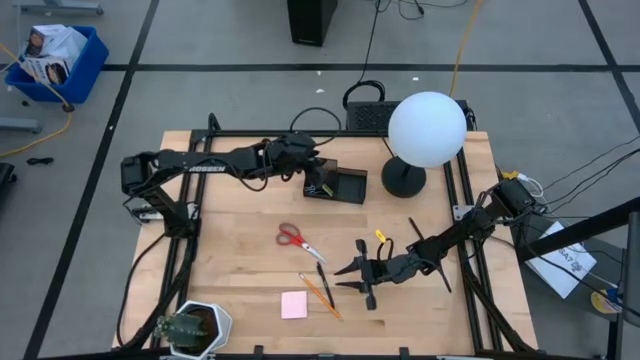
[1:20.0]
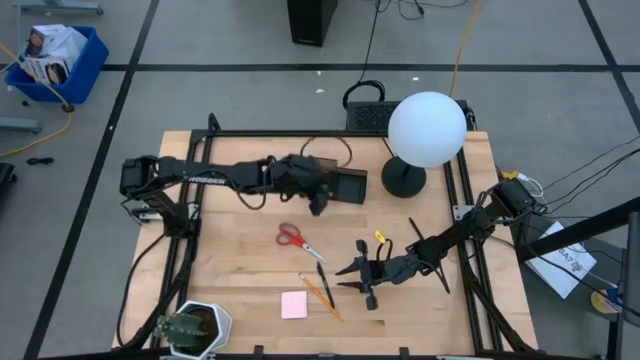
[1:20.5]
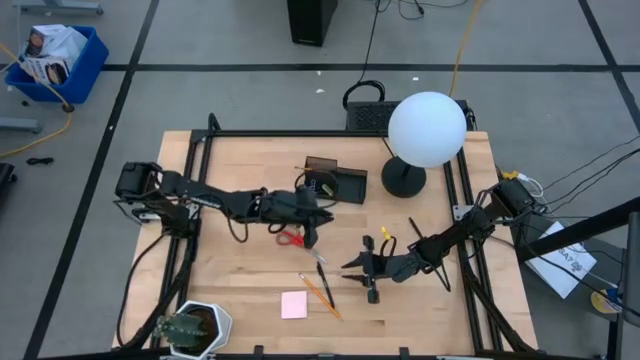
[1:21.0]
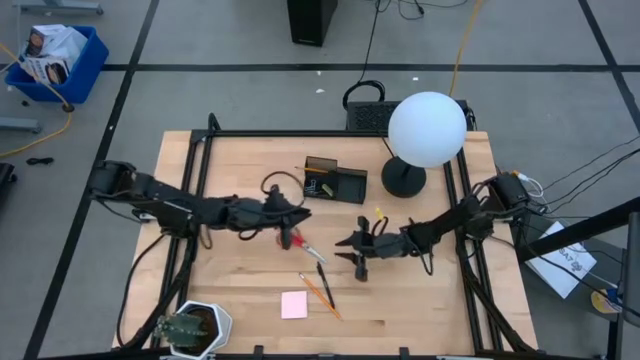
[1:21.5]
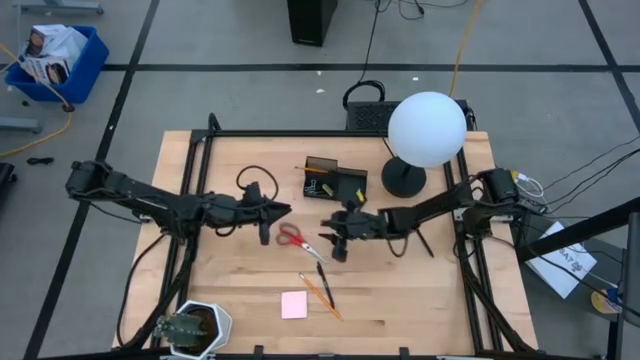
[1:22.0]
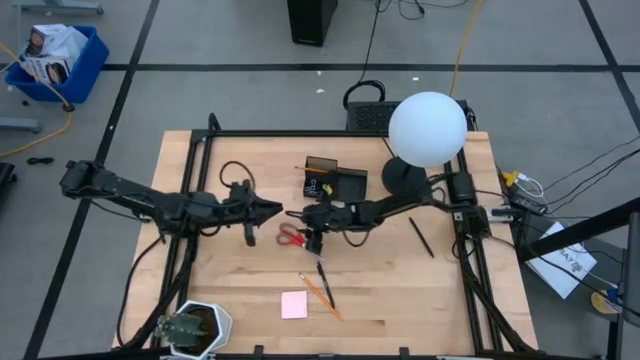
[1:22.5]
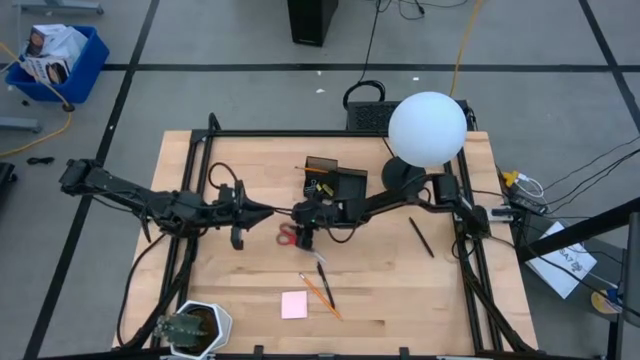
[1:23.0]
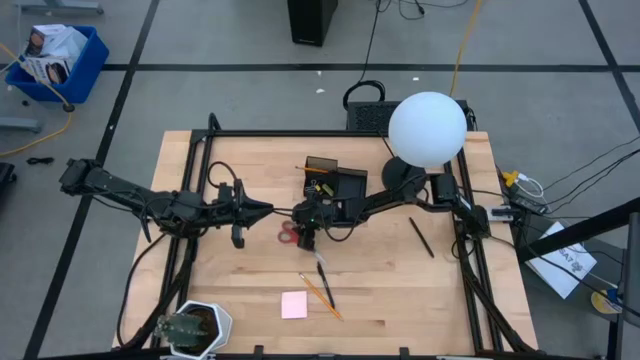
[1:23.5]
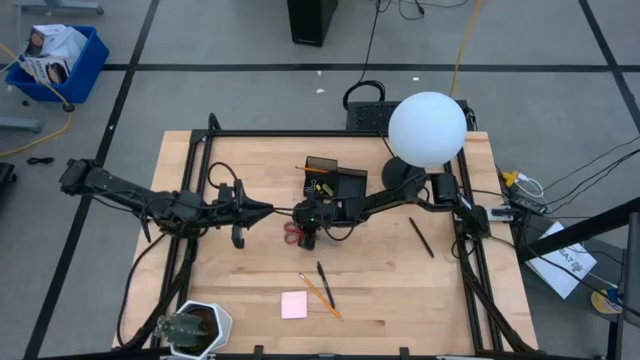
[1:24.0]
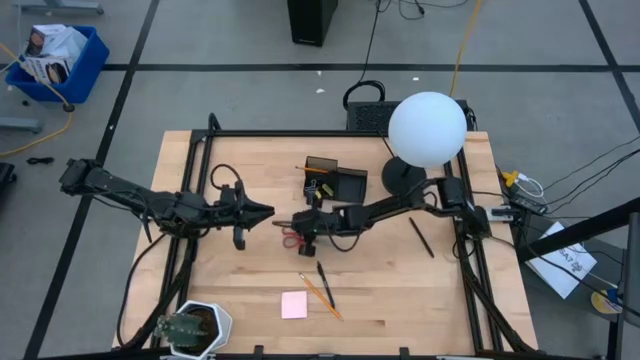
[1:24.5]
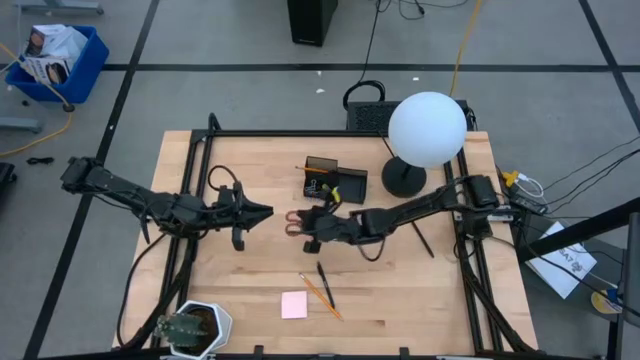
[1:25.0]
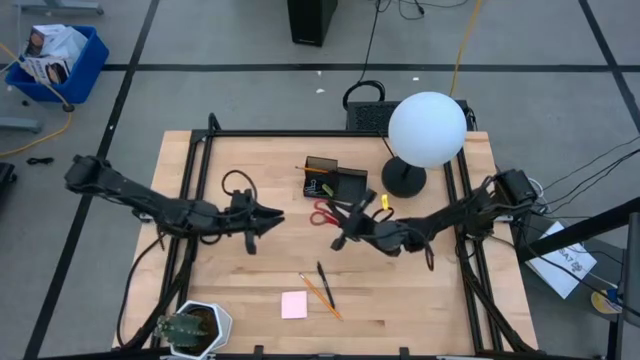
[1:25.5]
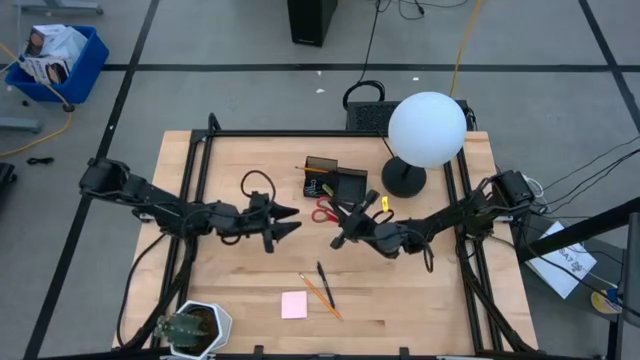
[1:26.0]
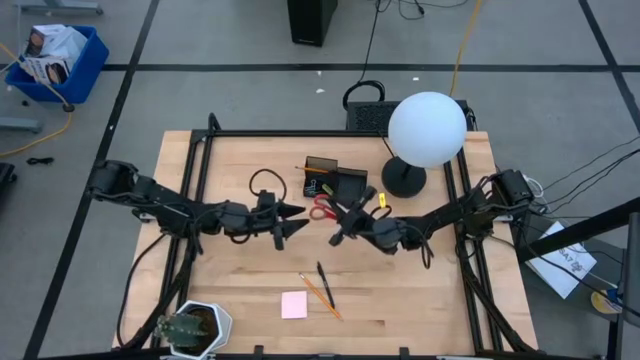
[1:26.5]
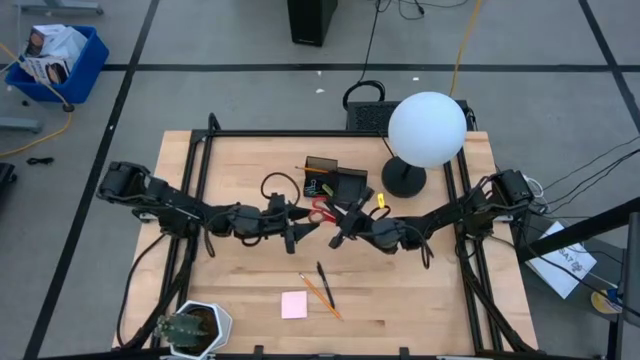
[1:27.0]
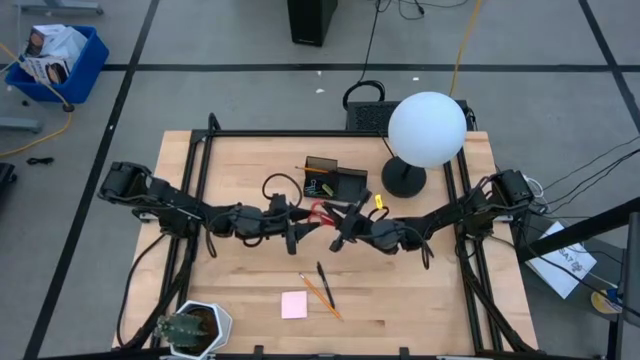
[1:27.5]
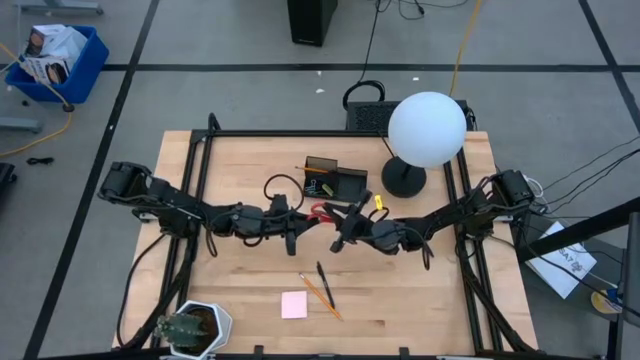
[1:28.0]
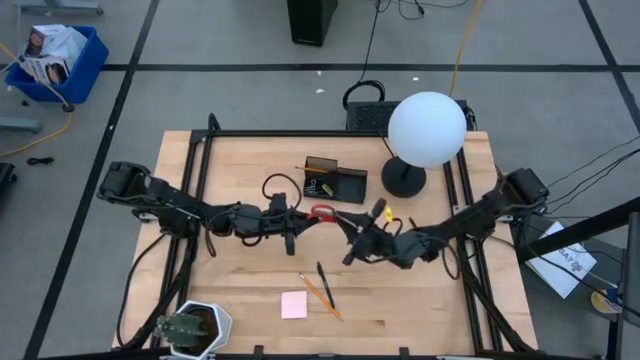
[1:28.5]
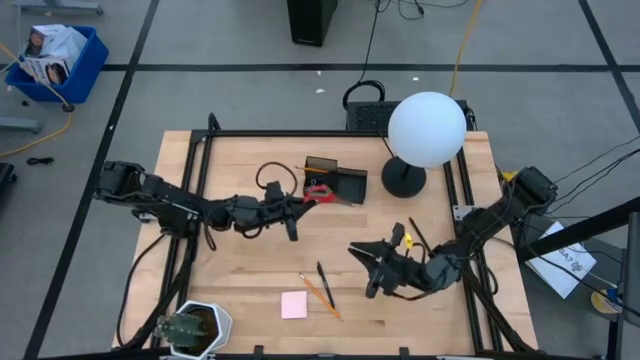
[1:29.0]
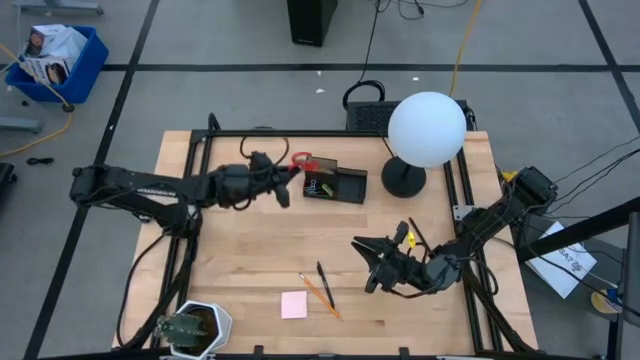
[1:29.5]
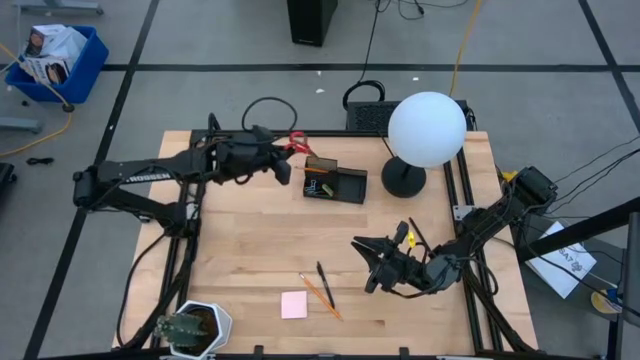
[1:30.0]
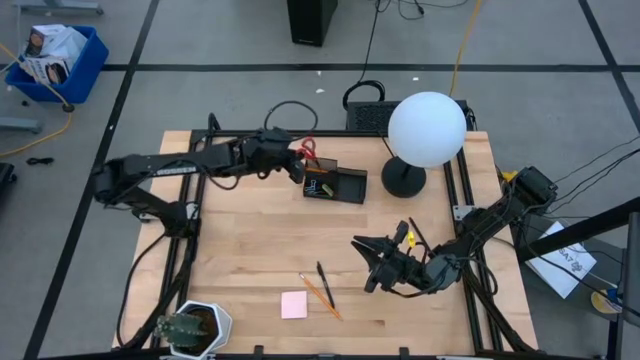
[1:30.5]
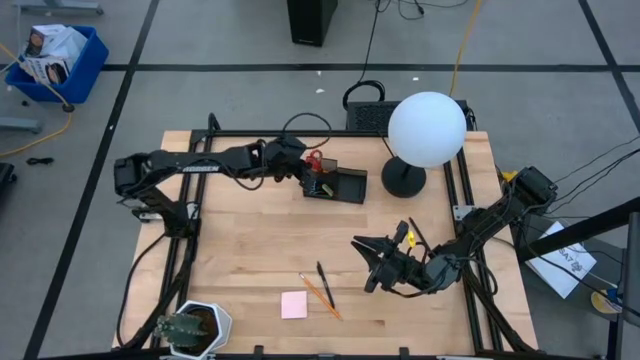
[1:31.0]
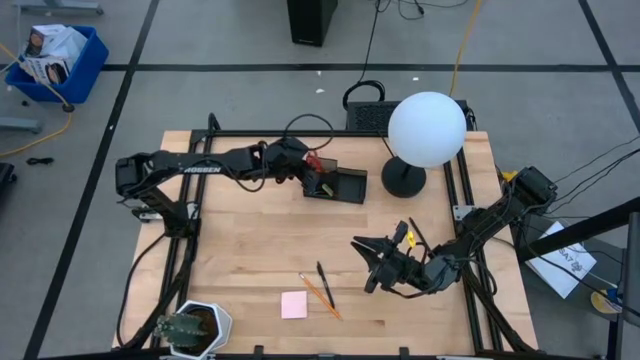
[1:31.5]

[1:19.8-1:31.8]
Task: Pick and place office supplies into organizer
Put the orange scissors into the black desk organizer

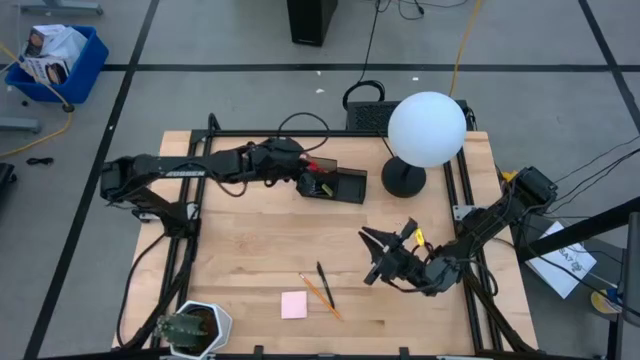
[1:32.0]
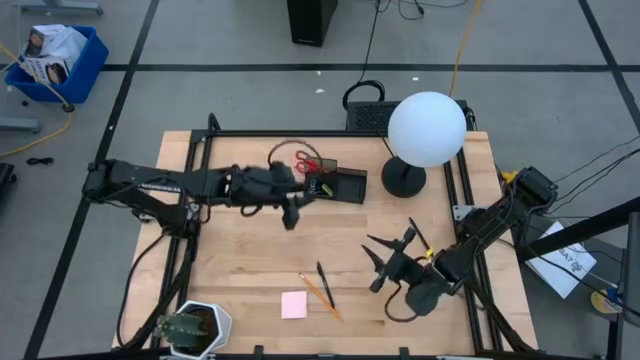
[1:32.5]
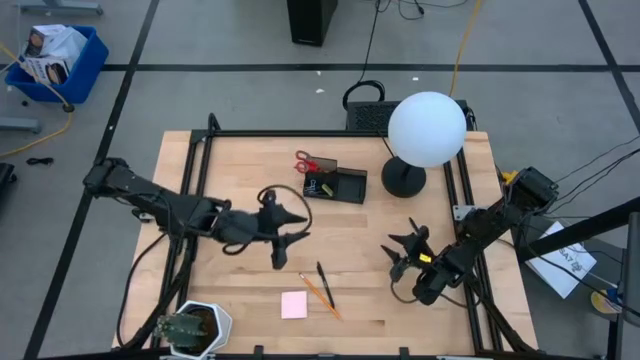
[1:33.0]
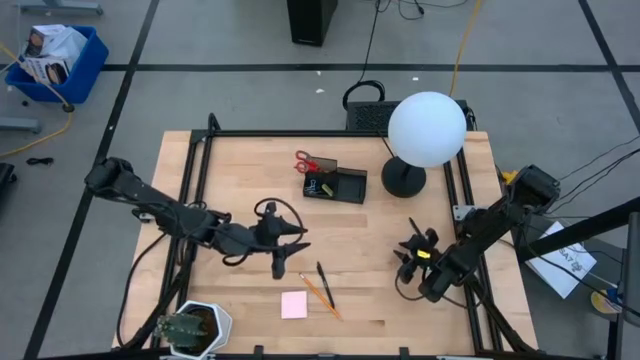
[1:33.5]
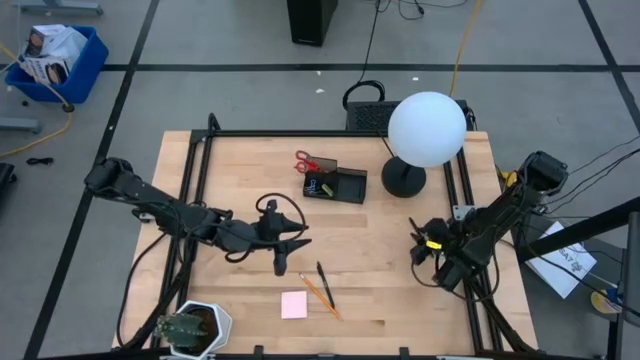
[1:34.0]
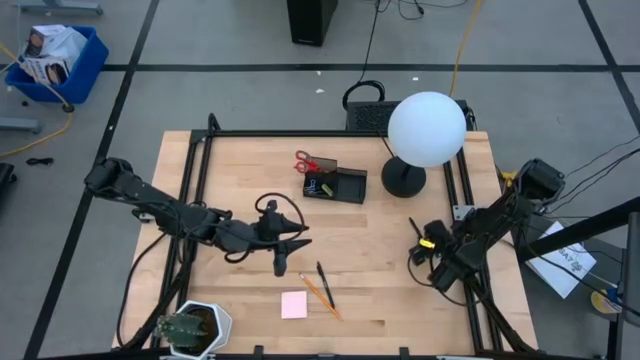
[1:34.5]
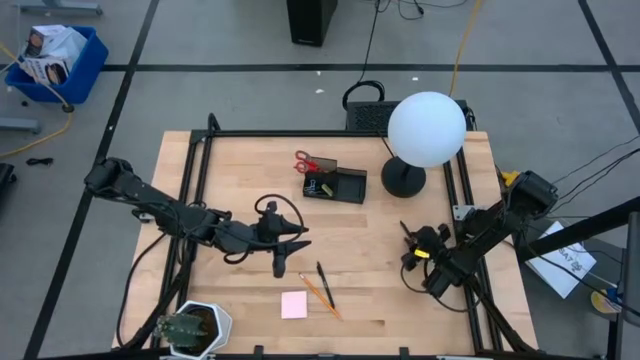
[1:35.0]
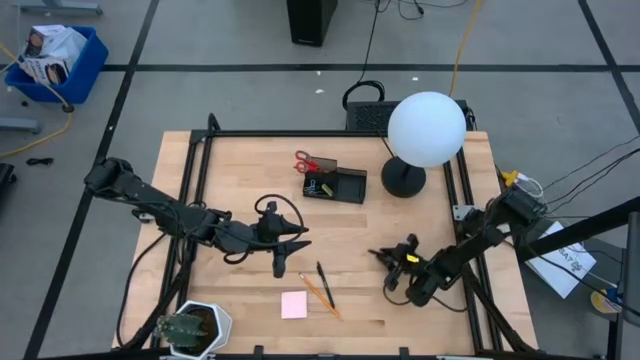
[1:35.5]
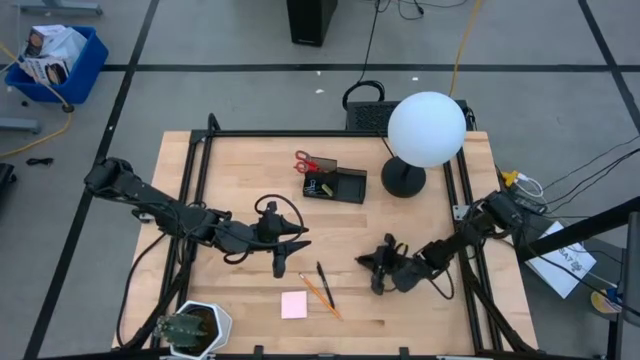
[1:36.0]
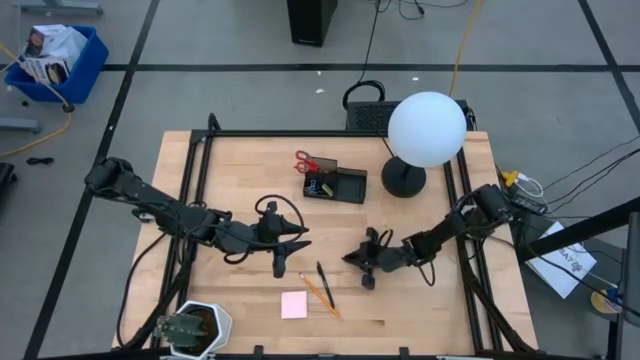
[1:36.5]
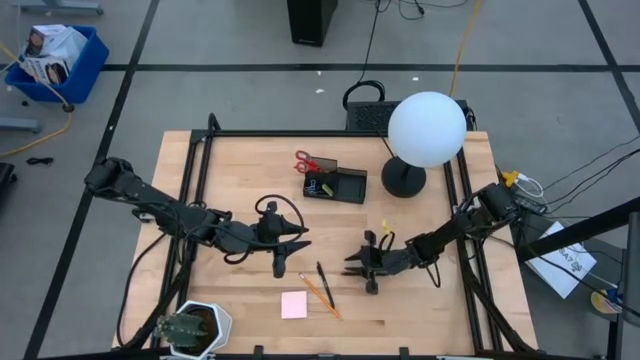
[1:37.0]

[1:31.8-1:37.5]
Put the right black pen into the black desk organizer

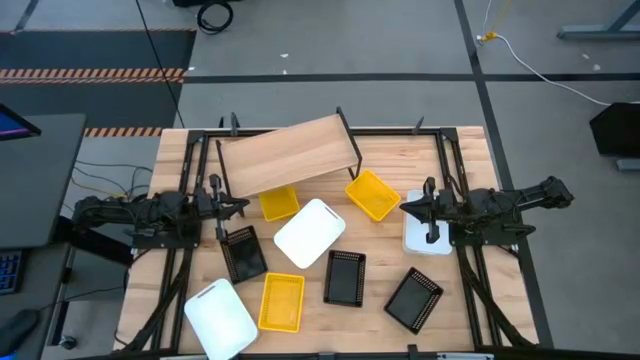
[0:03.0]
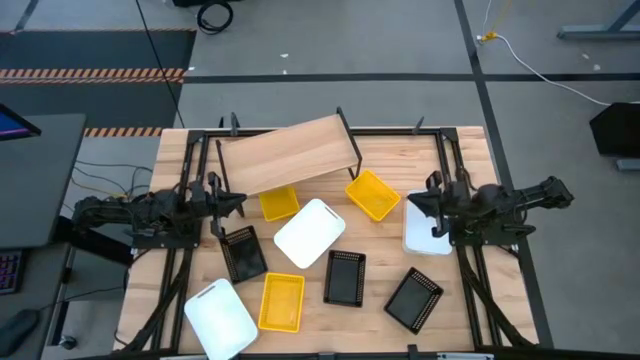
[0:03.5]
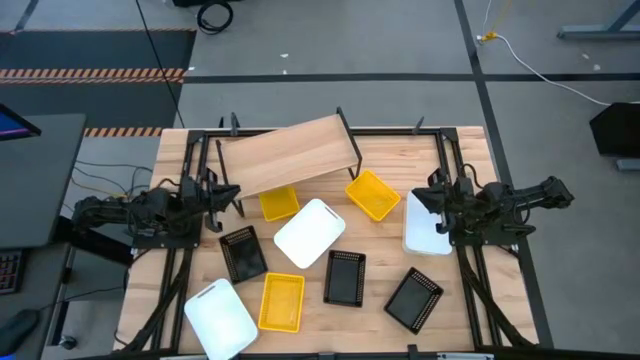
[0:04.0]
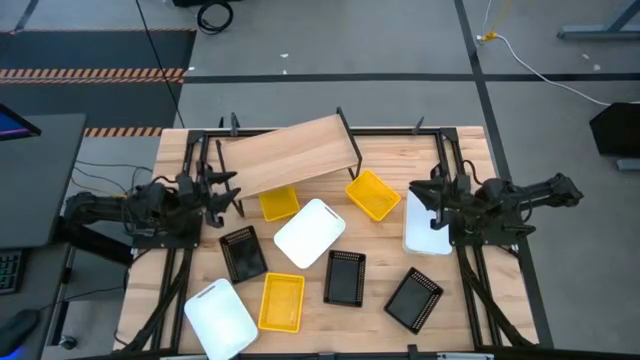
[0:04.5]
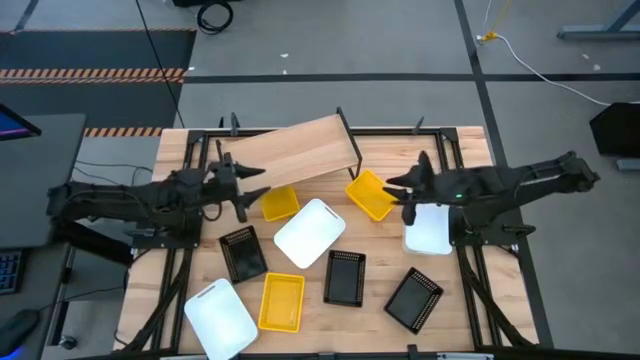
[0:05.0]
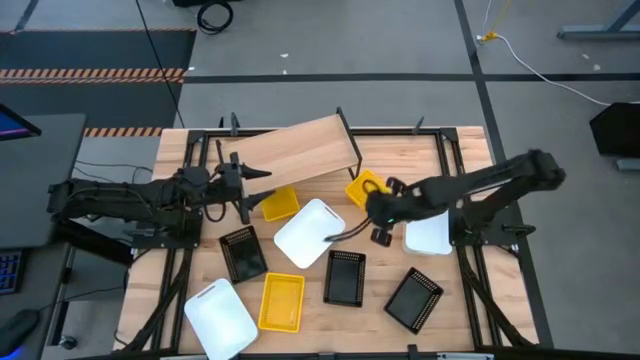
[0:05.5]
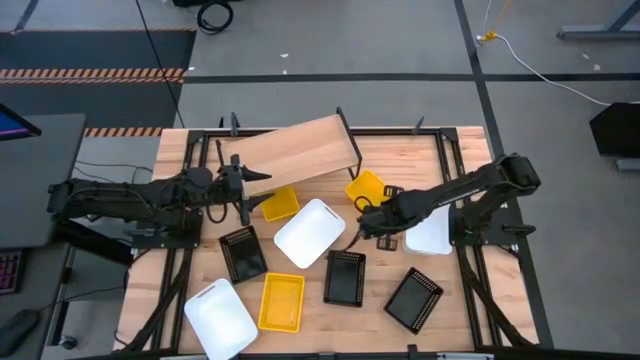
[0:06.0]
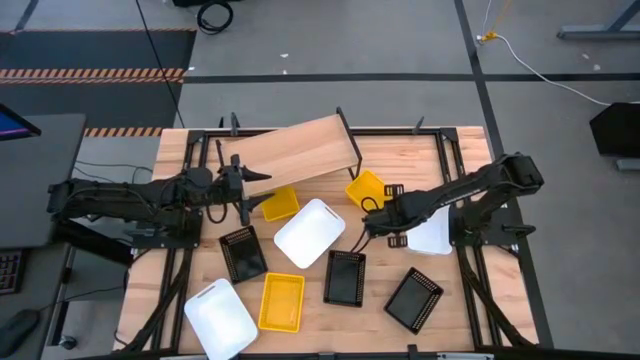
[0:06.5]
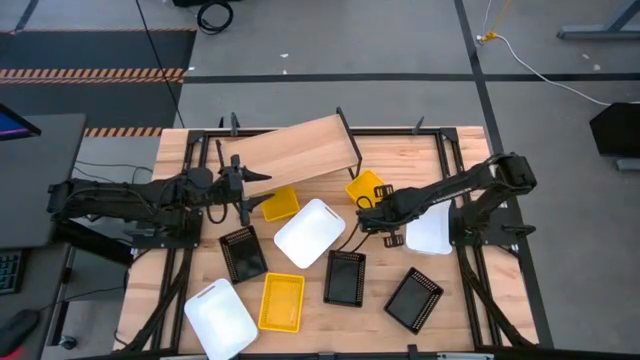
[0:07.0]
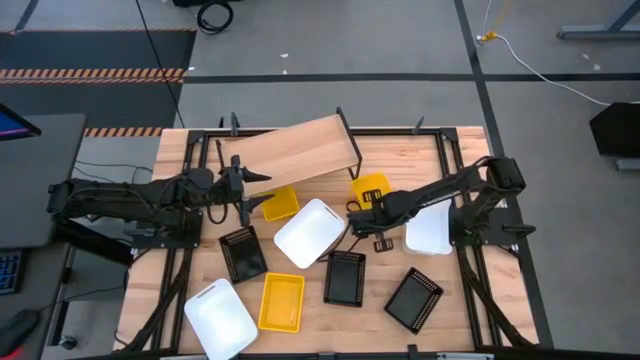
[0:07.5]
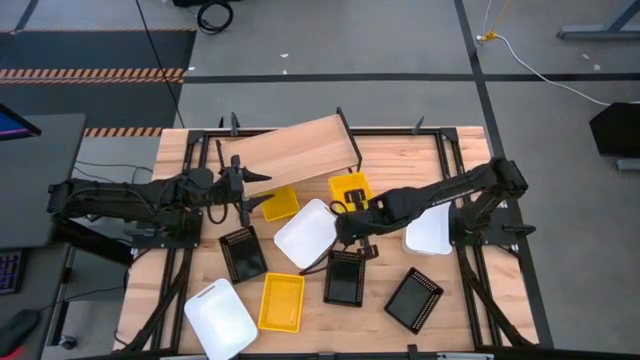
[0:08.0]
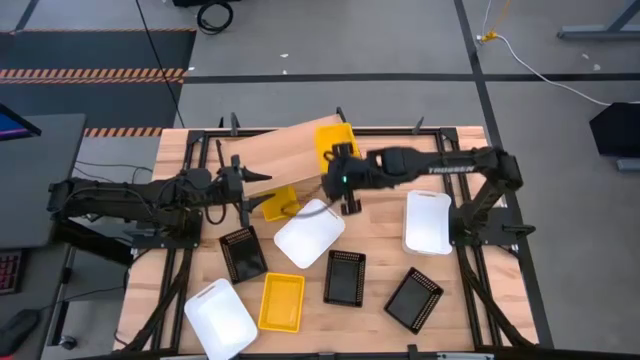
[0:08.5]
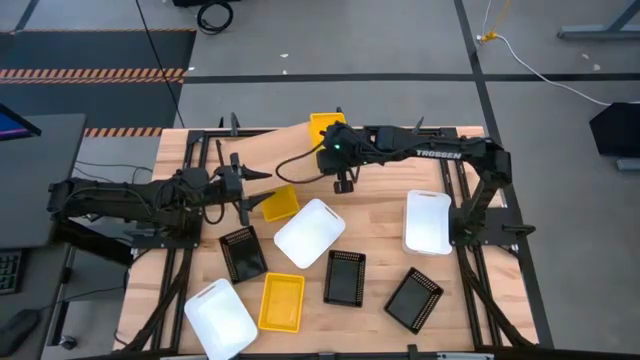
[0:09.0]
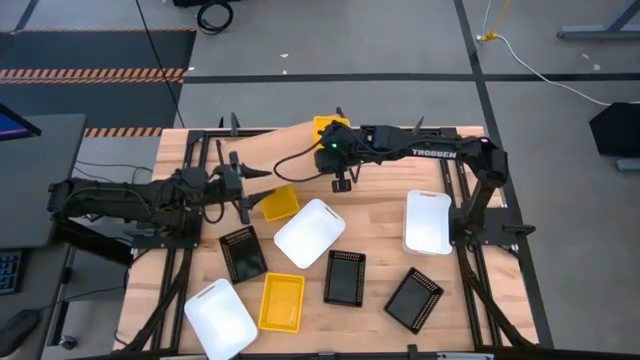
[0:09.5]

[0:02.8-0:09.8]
Task: Stack baskets on shelf by color
Put the top right yellow bin on the shelf
